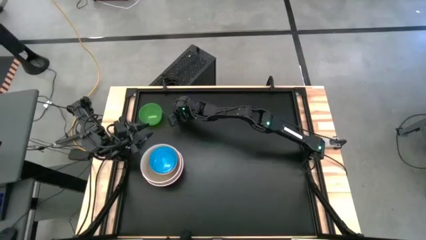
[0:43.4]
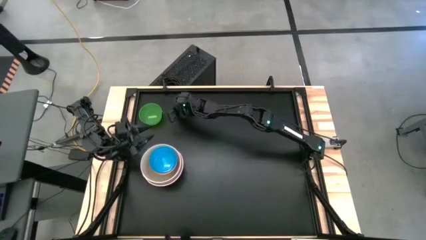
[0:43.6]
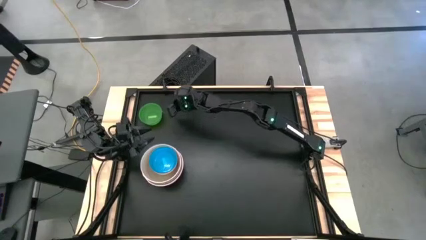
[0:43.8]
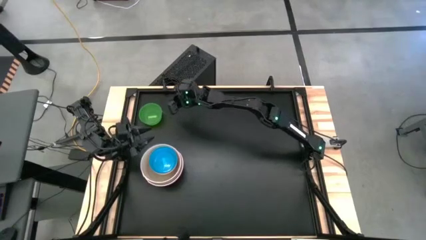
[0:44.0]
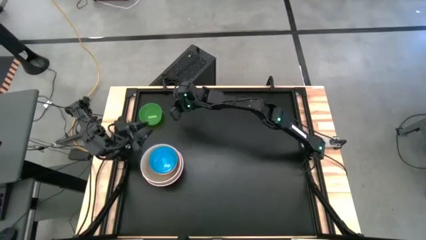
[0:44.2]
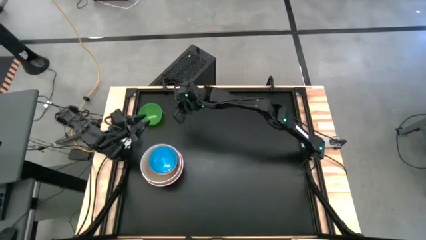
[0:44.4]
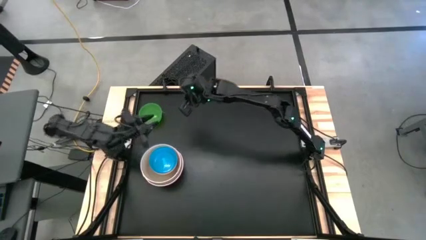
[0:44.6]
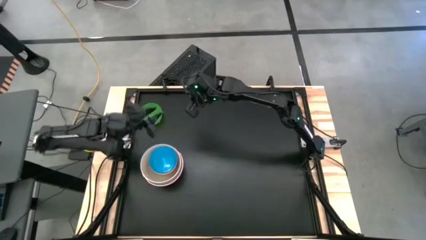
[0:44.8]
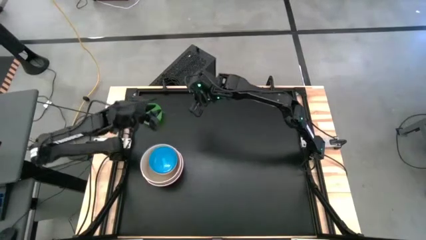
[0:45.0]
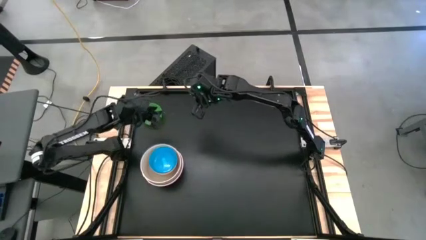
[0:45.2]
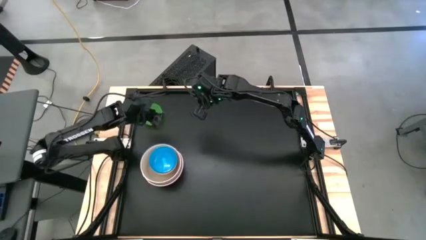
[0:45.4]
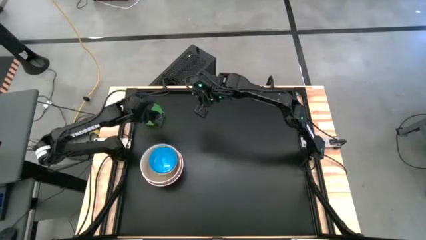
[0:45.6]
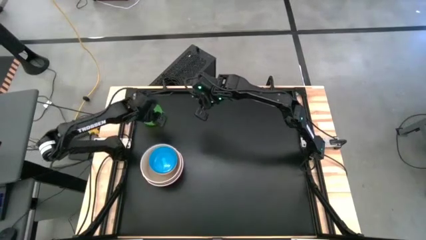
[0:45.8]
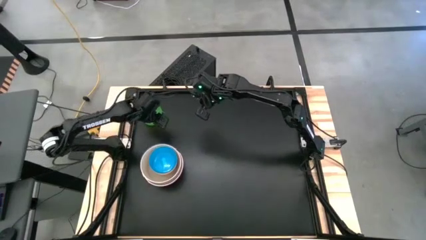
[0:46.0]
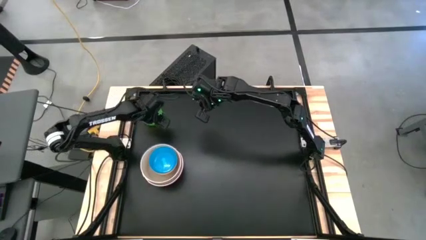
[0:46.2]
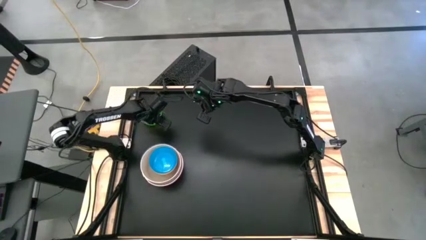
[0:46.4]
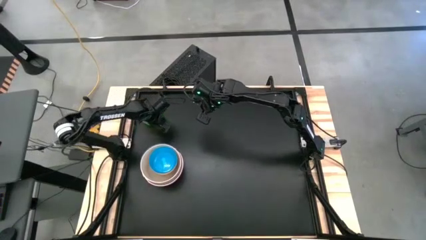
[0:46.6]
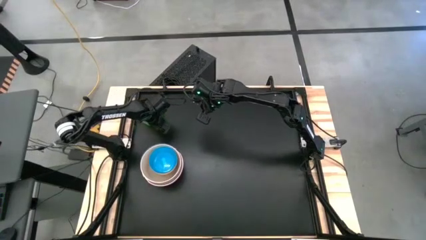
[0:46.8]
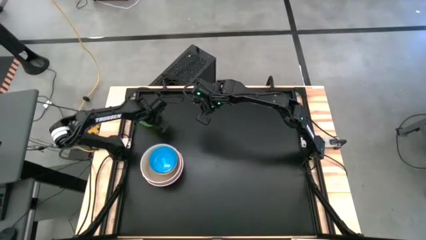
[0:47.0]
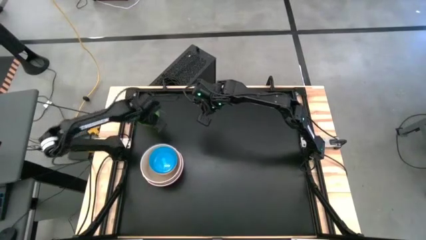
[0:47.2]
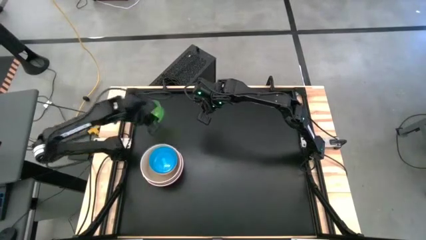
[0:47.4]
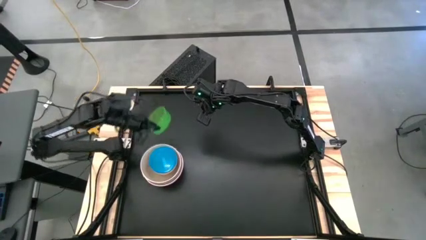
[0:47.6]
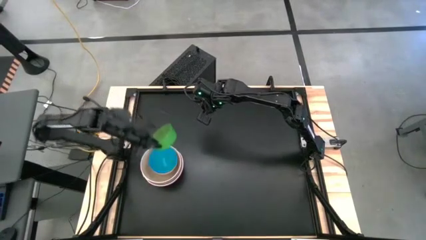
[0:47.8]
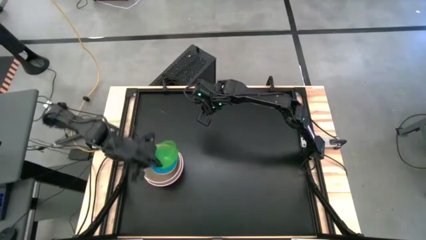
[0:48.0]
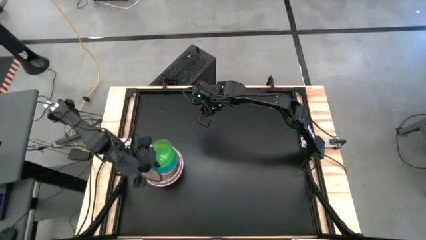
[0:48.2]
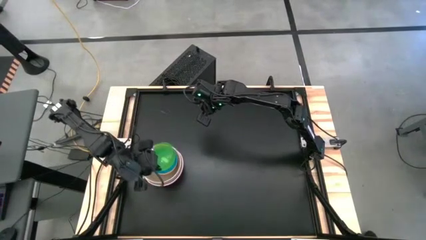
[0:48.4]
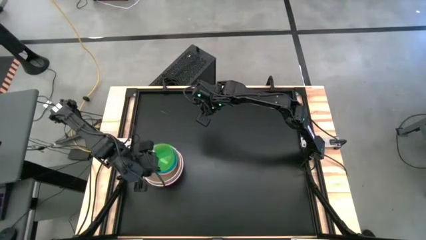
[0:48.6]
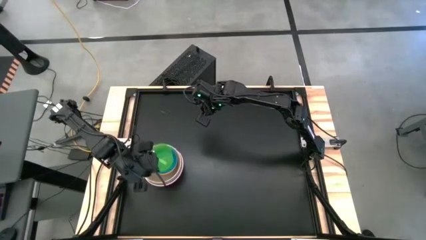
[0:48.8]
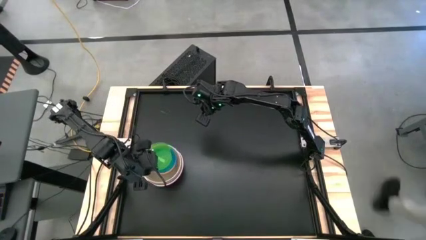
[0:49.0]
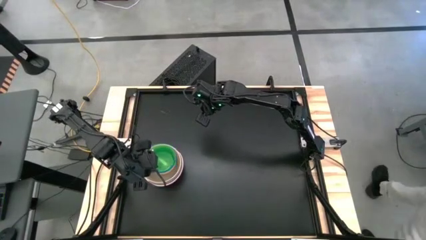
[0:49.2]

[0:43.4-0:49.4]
Stack the green bowl on top of the blue bowl

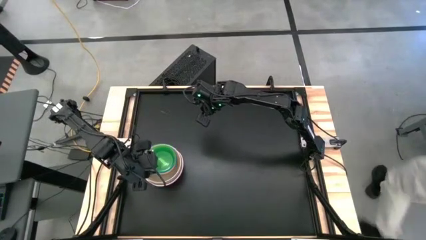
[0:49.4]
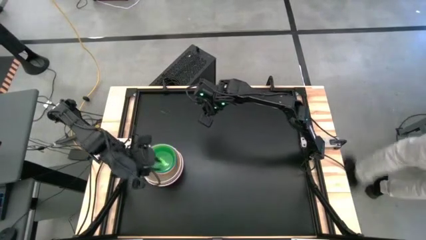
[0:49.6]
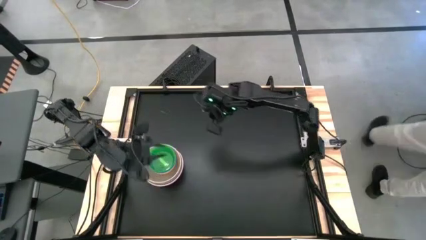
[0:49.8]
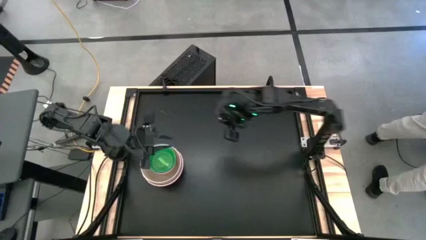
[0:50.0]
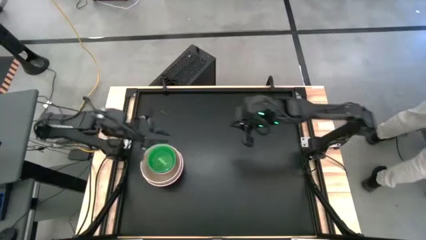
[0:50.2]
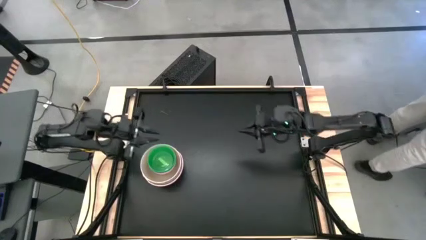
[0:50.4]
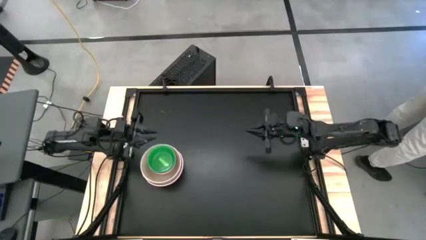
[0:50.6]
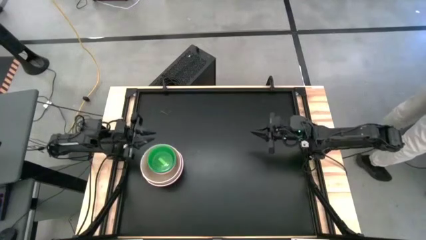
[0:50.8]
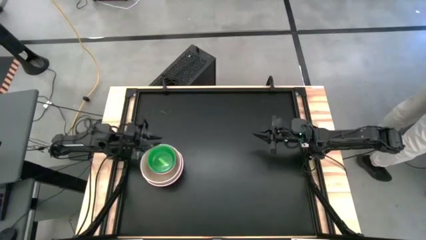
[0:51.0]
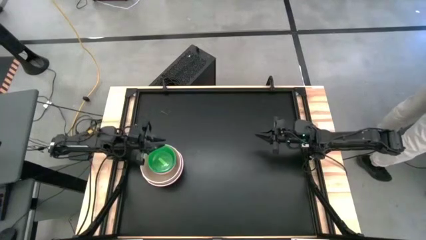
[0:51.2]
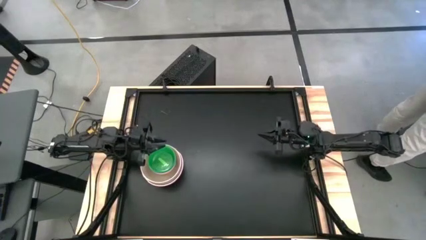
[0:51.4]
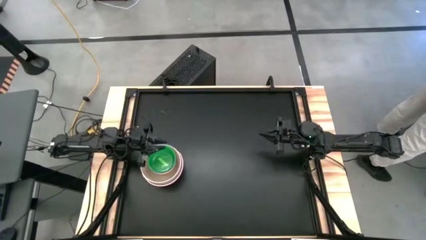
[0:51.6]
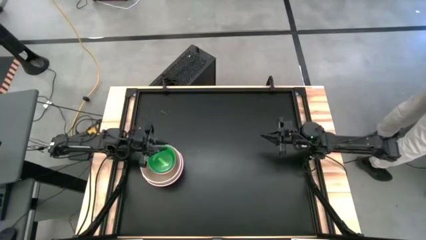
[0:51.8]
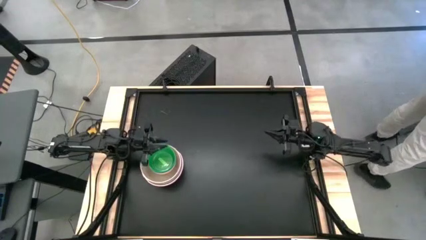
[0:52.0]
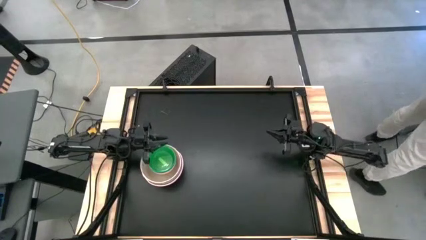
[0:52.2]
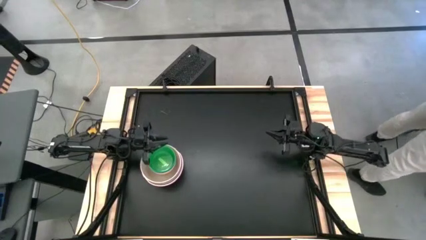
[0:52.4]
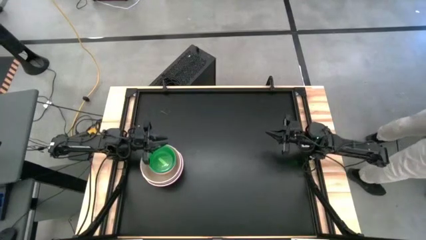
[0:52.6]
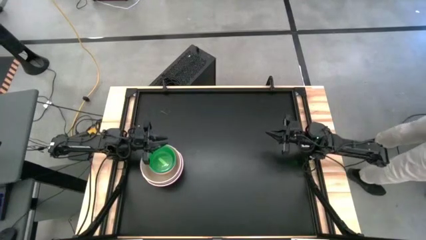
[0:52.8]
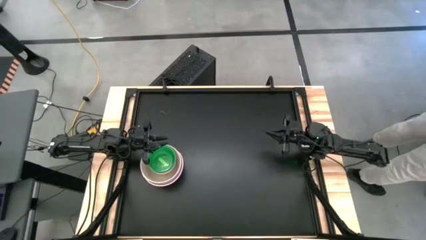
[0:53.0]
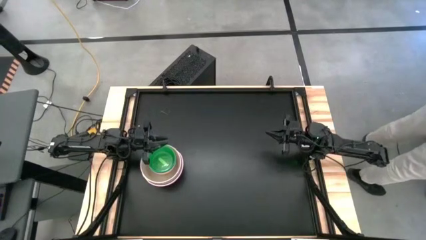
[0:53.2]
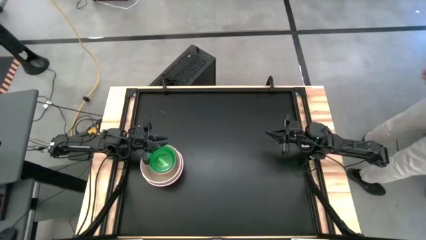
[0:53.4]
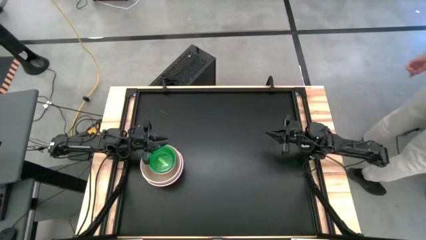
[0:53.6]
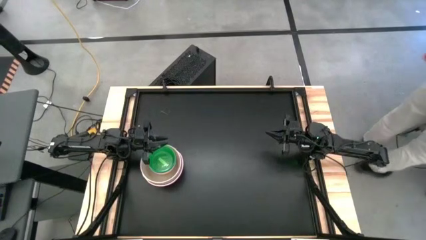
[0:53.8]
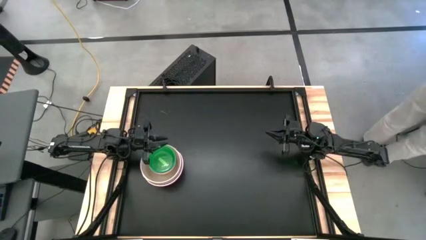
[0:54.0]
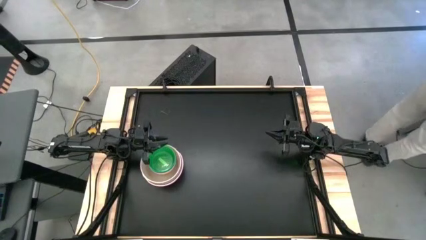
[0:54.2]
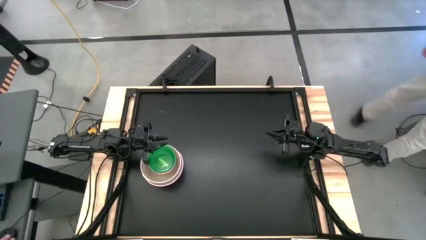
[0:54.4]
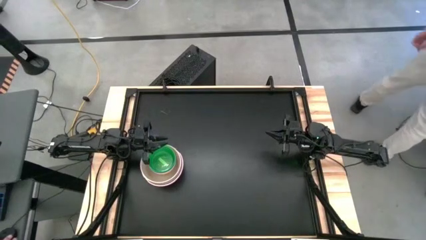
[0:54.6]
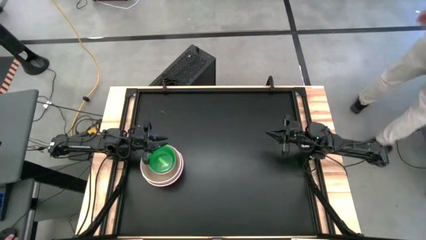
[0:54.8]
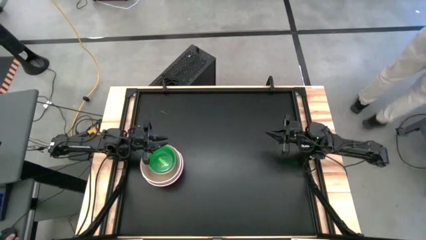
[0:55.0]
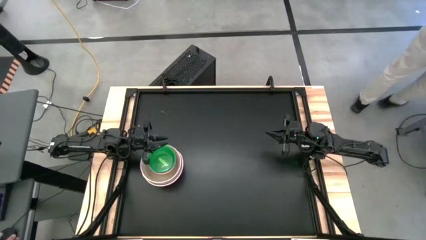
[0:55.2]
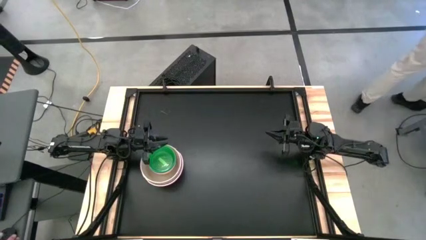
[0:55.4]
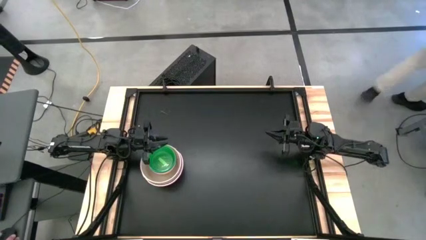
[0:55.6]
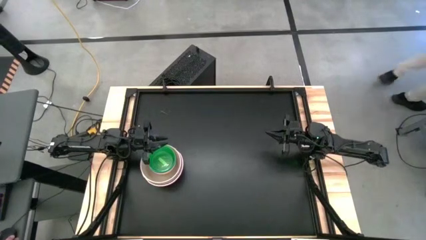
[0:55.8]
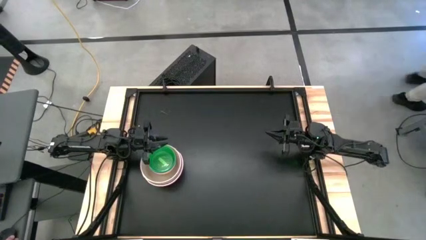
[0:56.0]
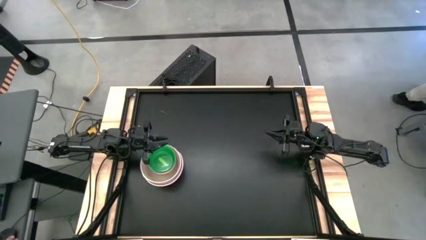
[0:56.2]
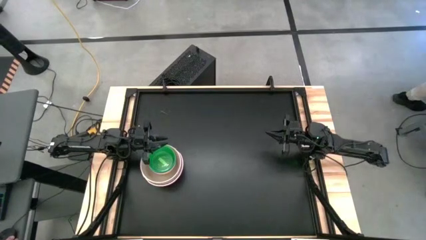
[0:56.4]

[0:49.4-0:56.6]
Return to Home Position
